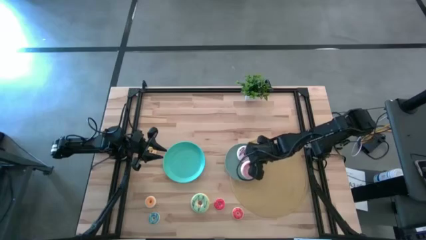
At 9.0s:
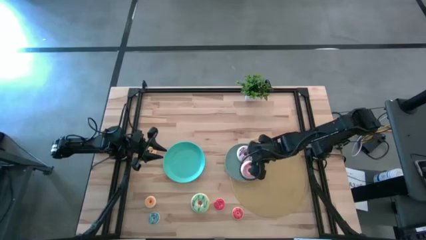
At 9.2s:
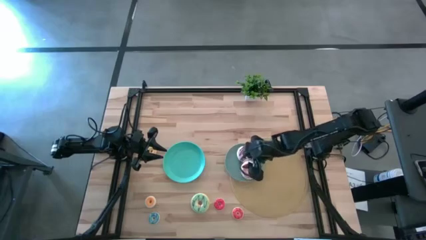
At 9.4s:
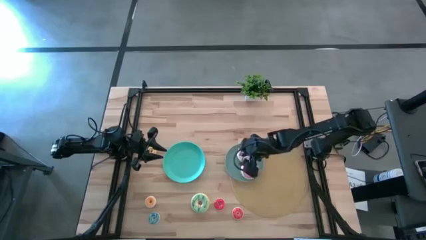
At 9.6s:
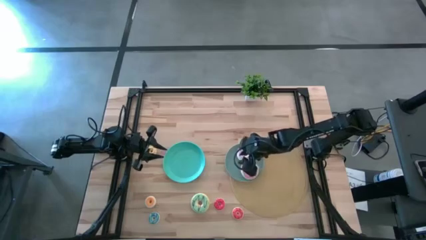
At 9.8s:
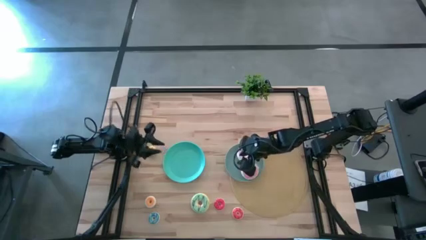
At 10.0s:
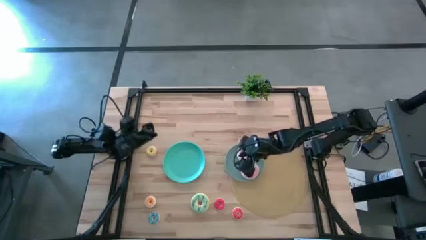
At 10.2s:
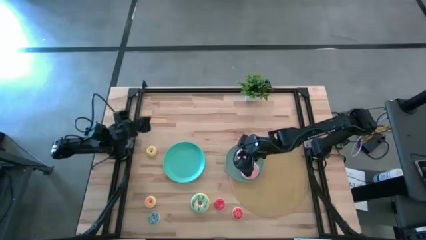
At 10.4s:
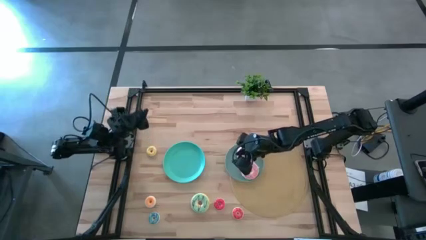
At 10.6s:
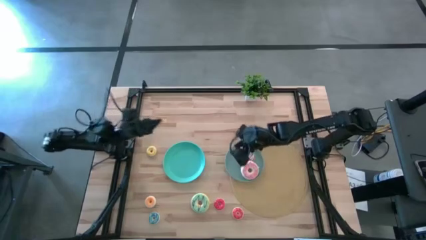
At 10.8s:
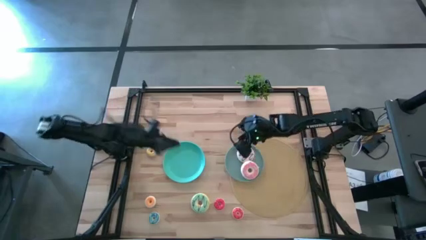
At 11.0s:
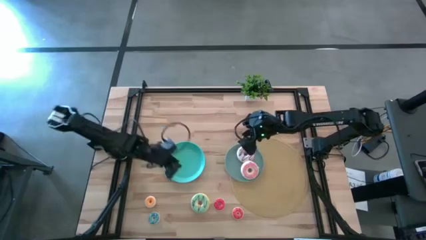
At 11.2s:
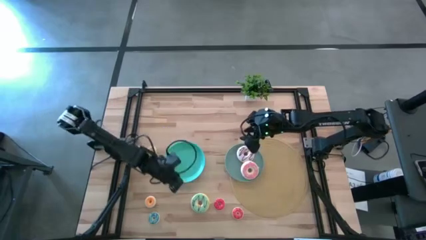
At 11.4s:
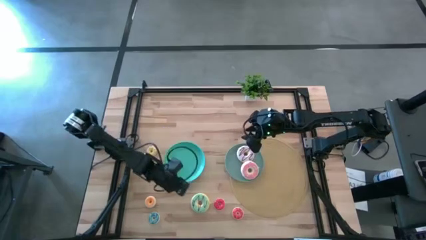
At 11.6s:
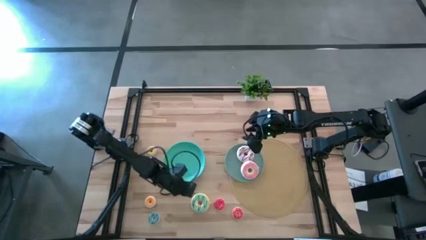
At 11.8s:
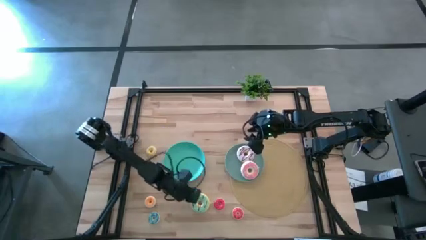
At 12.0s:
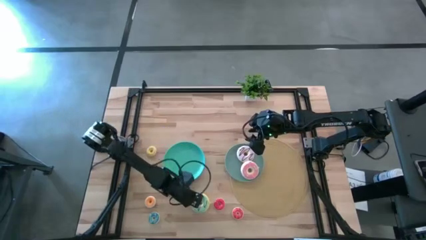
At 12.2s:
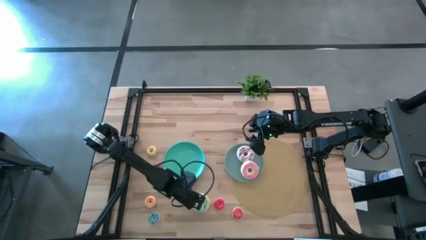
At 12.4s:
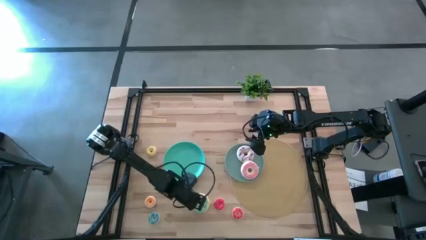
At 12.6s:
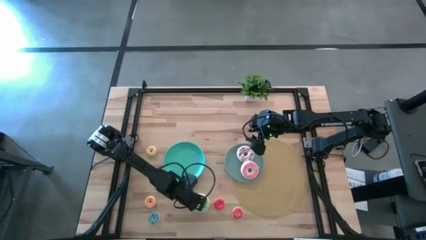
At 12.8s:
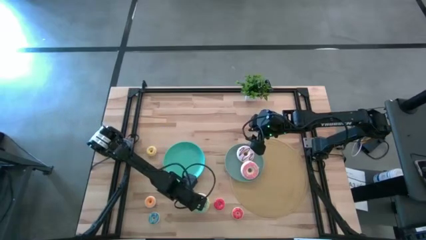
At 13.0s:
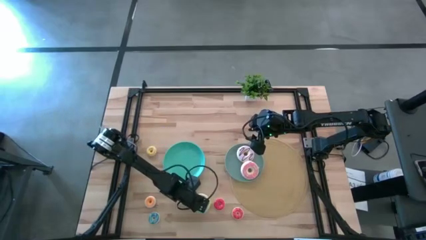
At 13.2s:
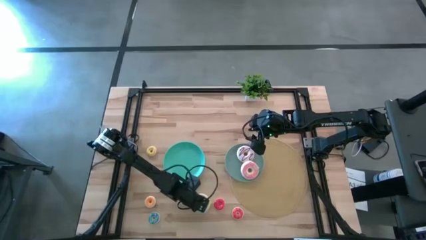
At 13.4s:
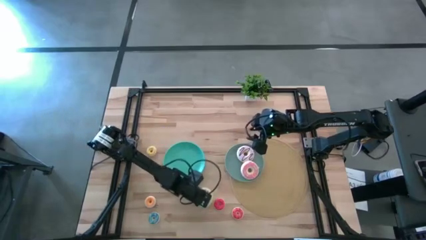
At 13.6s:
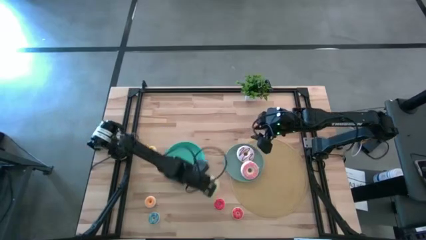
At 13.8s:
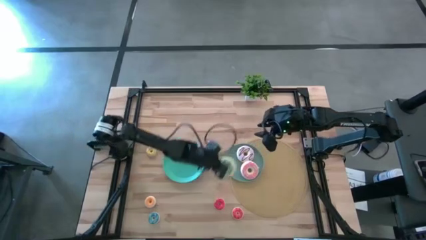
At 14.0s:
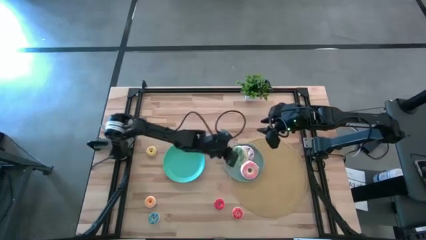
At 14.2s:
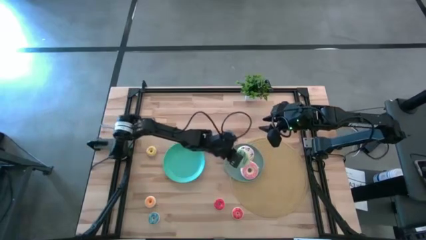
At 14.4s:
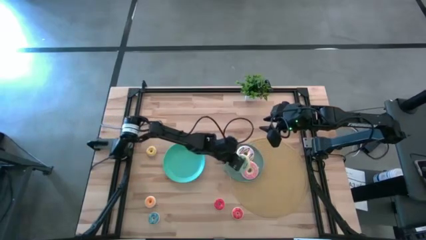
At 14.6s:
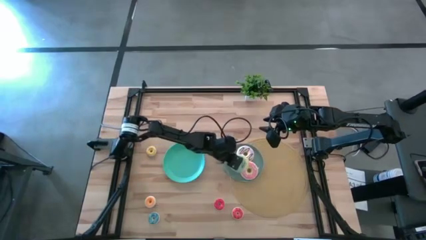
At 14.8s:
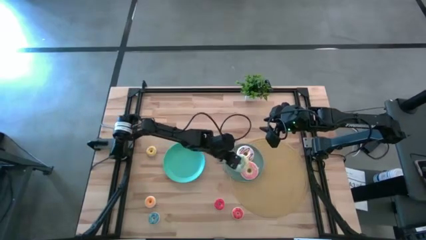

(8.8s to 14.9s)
Task: Pick & Place donuts
Put the large blue donut on the blue plate

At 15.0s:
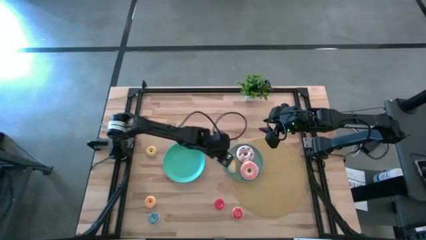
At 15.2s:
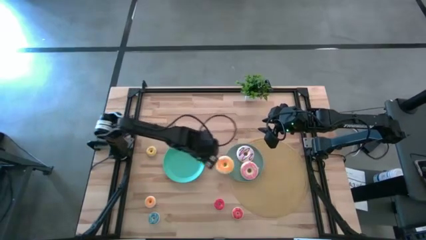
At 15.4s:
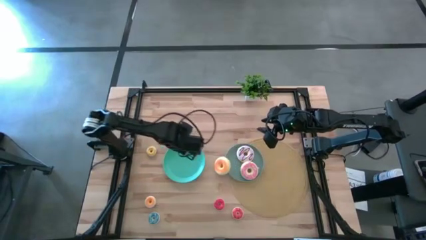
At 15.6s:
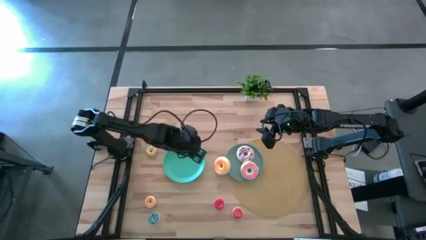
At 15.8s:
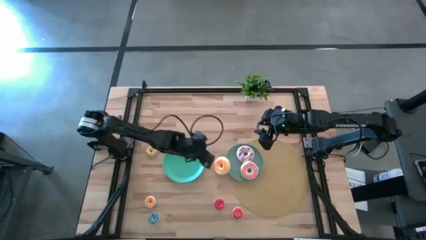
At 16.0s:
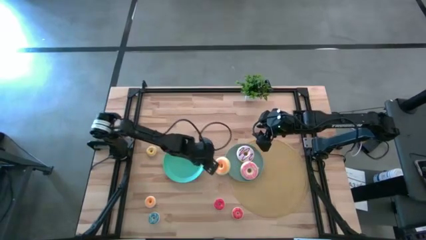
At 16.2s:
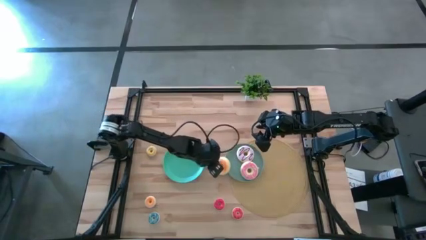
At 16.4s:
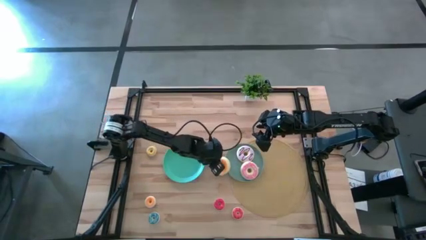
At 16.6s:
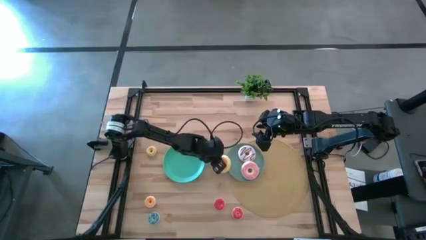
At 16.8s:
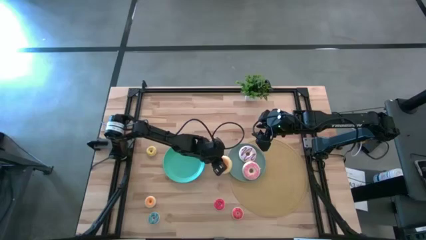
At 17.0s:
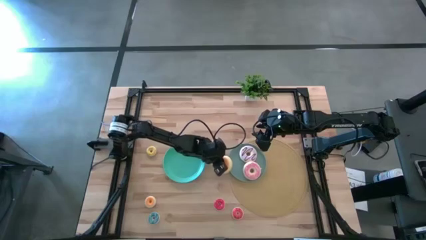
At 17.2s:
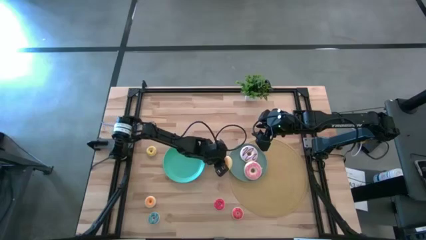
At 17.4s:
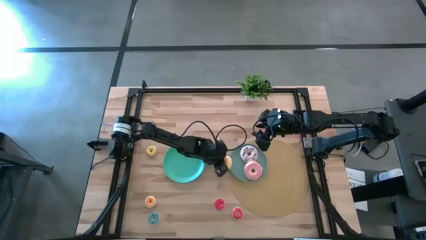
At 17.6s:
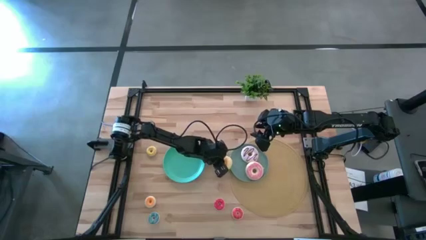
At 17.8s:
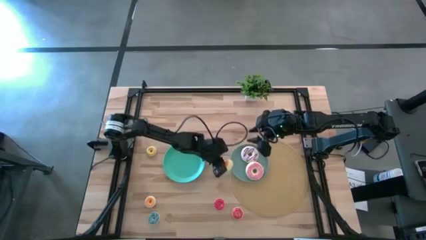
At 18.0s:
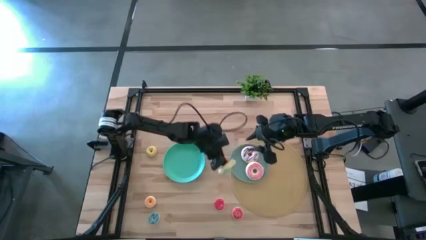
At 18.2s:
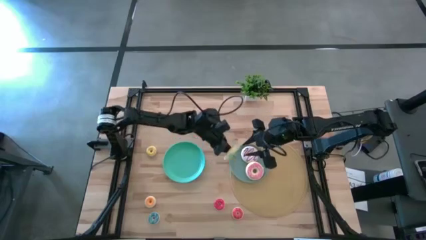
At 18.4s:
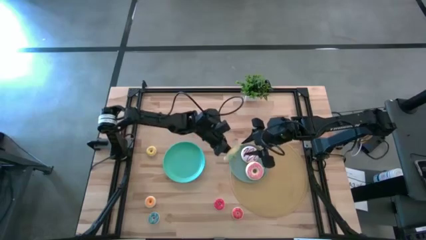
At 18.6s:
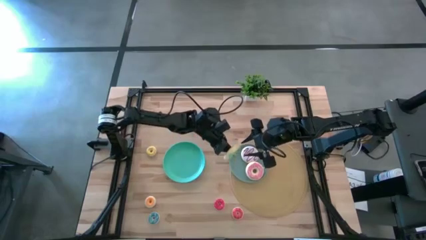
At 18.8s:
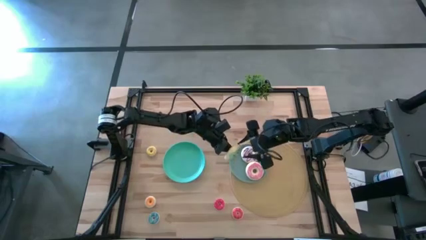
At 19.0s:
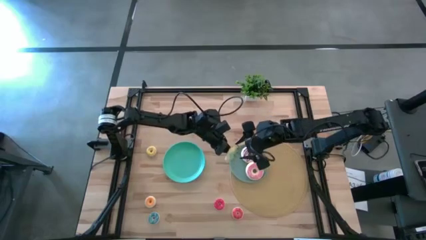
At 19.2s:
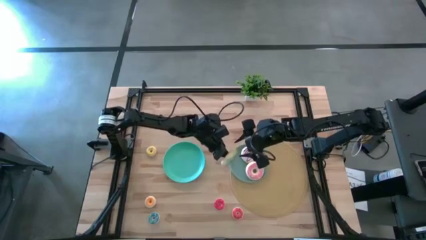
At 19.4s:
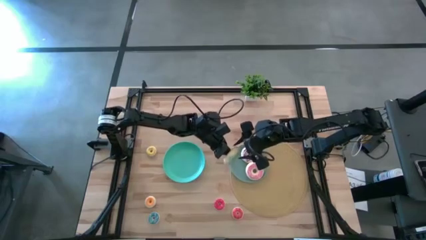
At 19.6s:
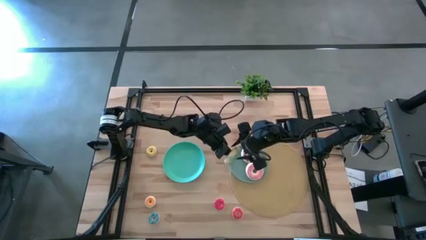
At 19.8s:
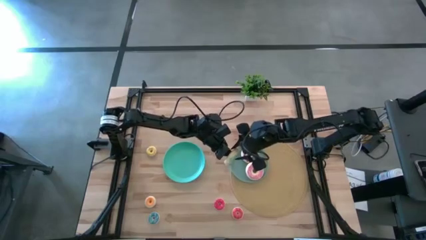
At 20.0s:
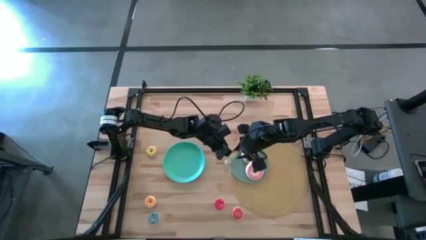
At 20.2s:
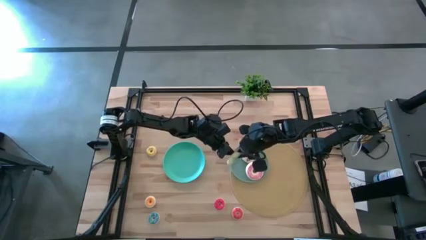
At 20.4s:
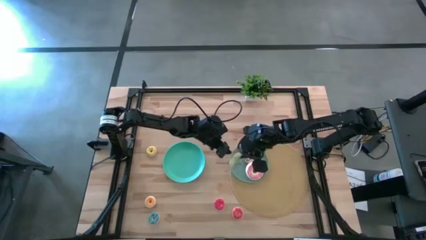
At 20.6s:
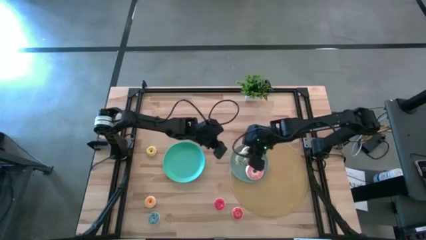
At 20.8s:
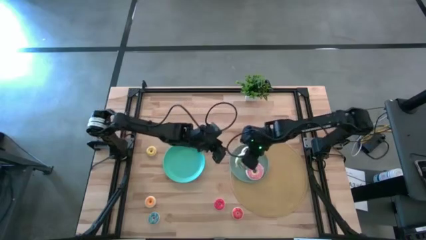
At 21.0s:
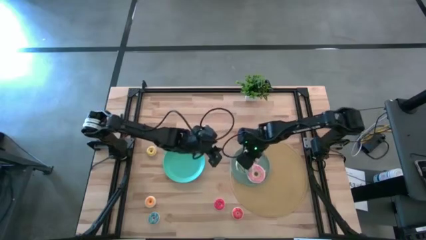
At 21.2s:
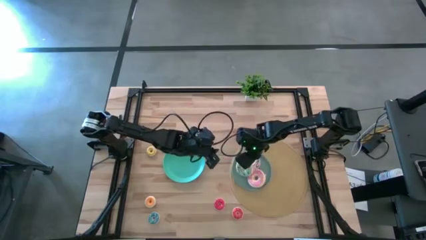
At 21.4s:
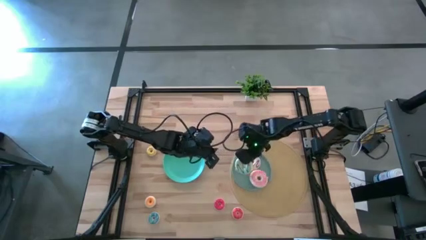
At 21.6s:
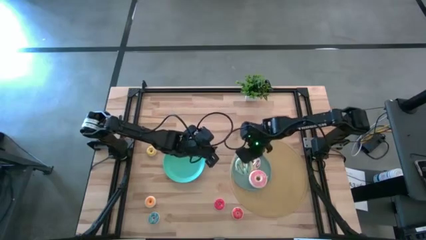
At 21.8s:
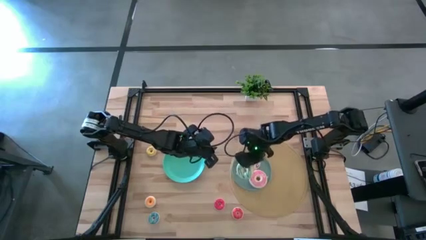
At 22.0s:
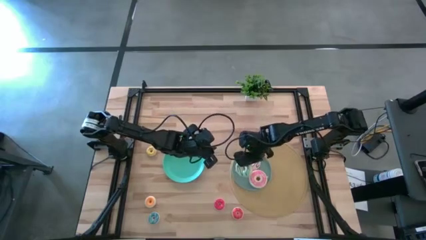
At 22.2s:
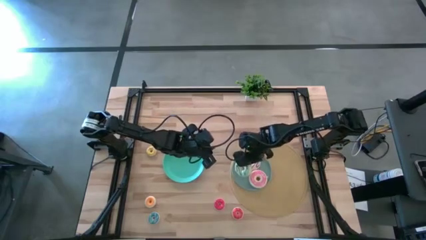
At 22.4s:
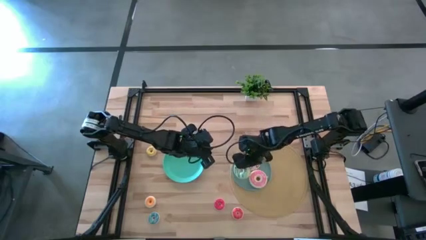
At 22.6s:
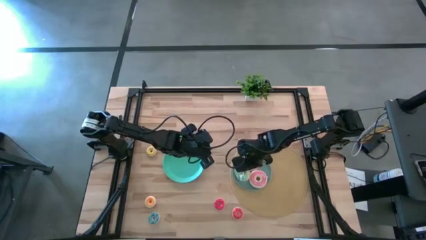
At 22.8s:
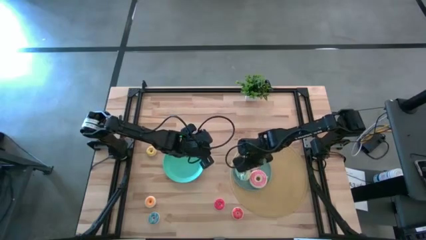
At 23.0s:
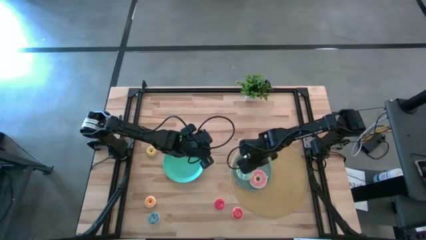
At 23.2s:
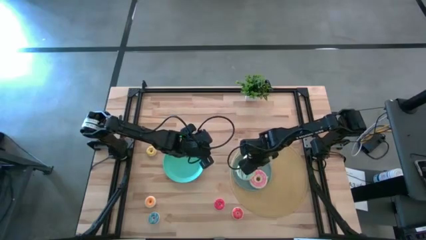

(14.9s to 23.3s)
Put the large blue donut on the blue plate

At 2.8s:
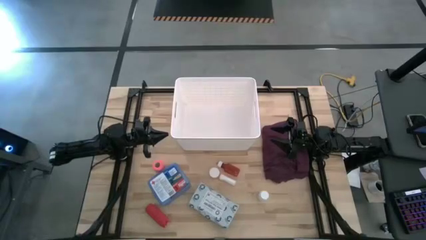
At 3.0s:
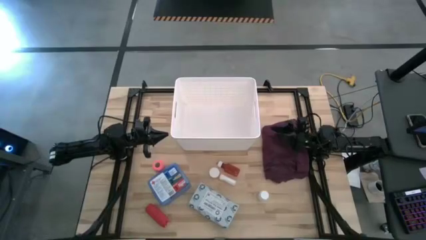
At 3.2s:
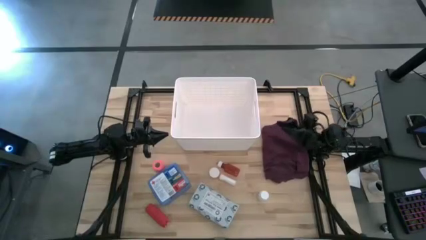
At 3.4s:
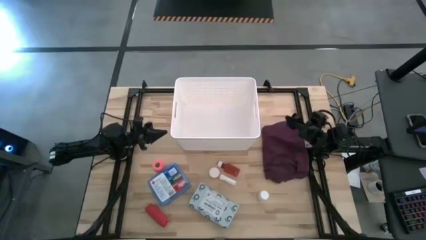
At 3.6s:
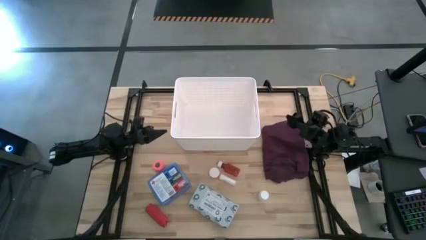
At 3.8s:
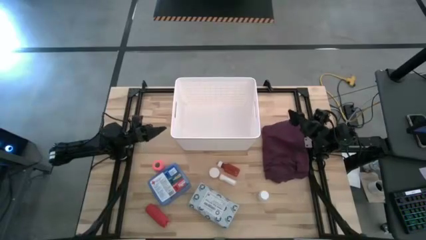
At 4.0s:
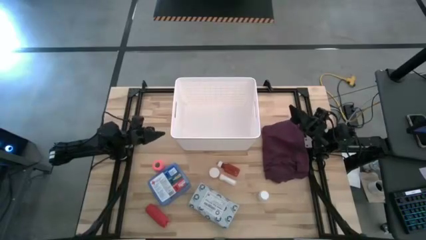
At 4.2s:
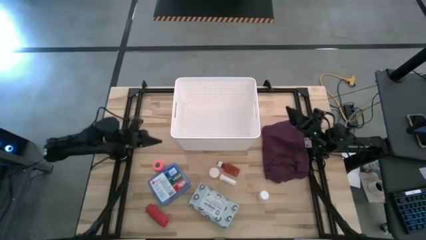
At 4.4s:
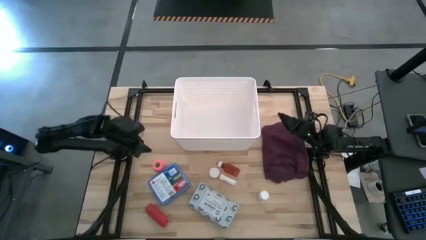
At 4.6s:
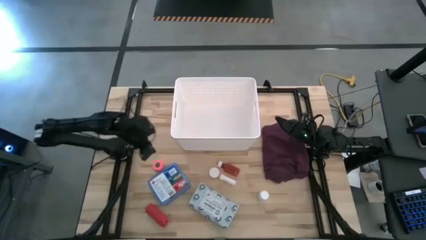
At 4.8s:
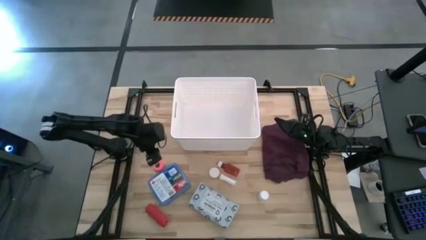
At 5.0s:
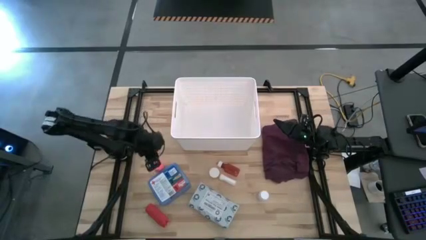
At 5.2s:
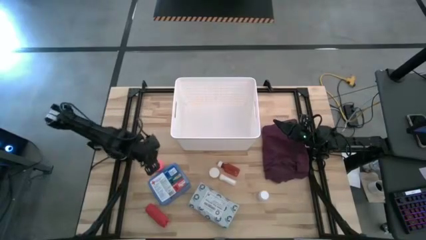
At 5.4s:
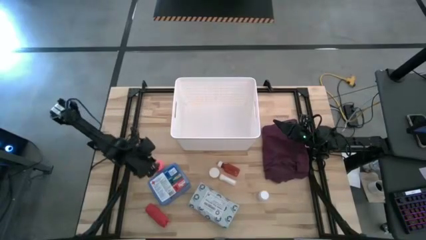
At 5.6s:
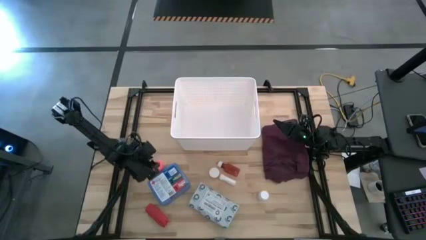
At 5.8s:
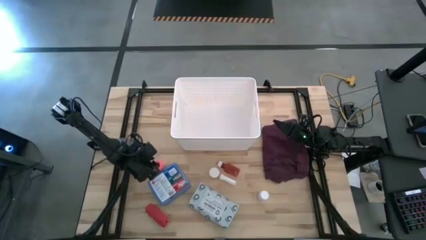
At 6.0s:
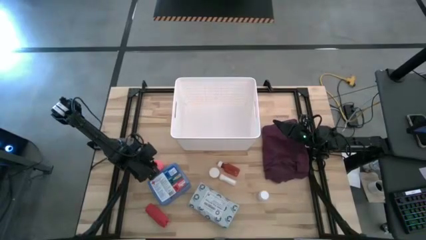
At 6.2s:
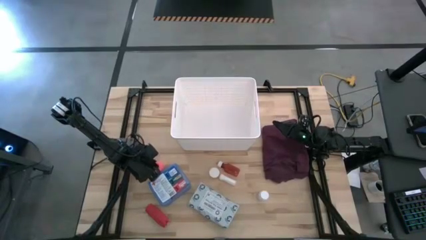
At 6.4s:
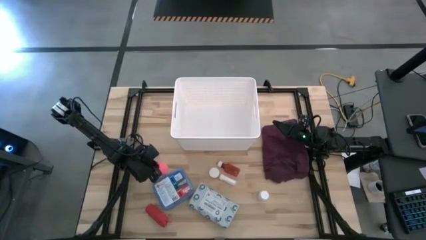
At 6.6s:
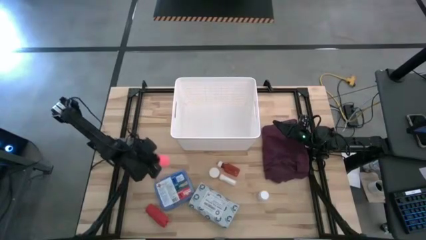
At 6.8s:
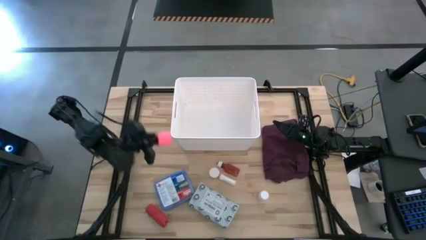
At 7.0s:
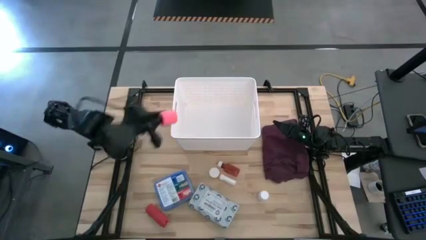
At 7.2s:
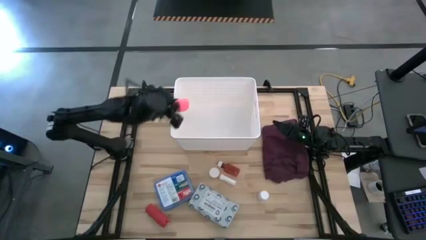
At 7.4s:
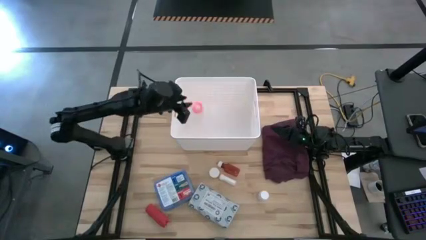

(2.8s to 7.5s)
Task: Pick & place medical supplies in basket/bin
Put the pink bandage into the white basket
